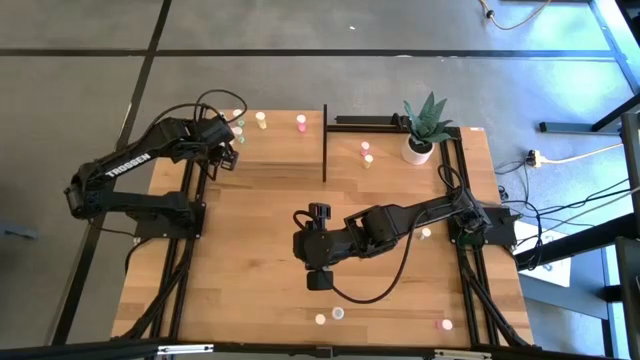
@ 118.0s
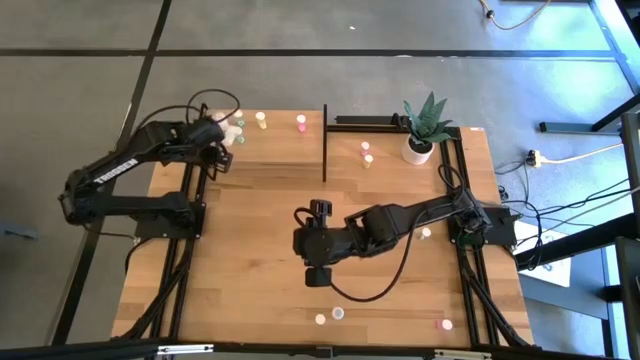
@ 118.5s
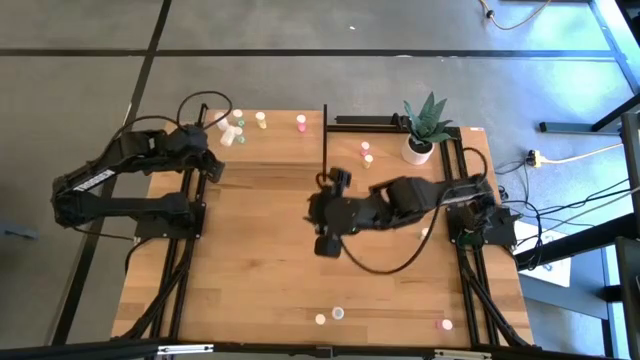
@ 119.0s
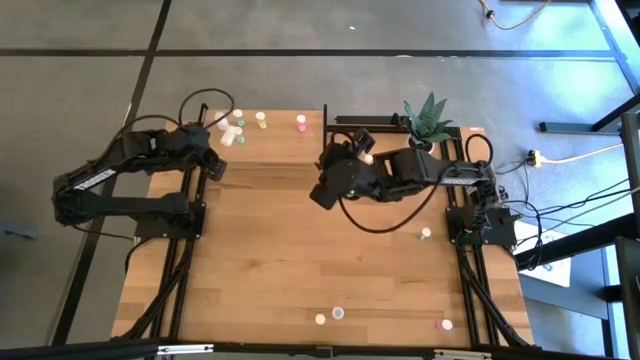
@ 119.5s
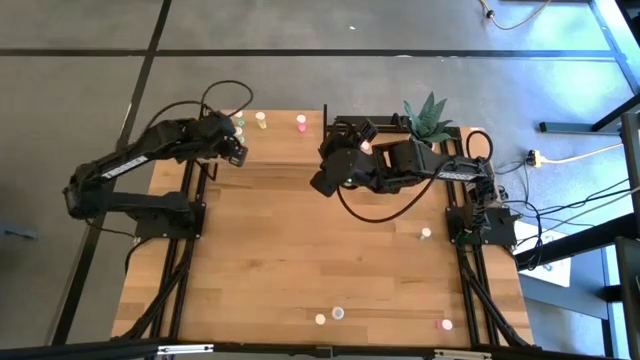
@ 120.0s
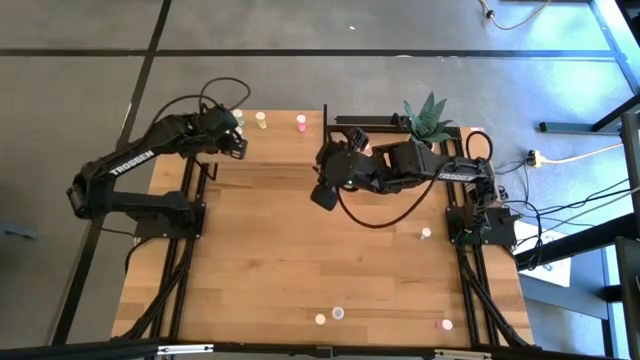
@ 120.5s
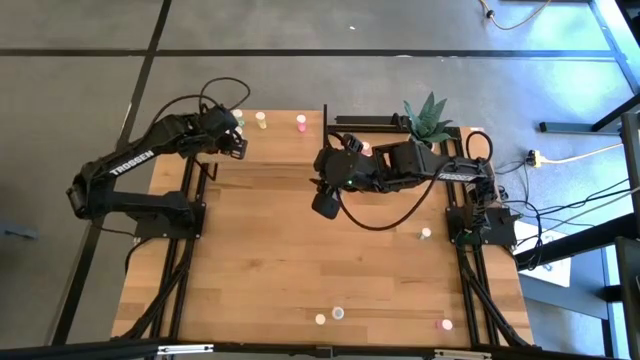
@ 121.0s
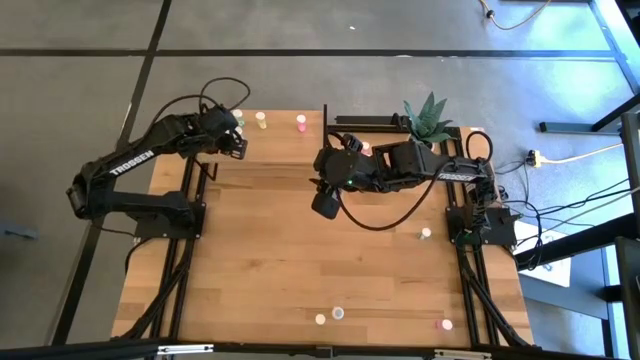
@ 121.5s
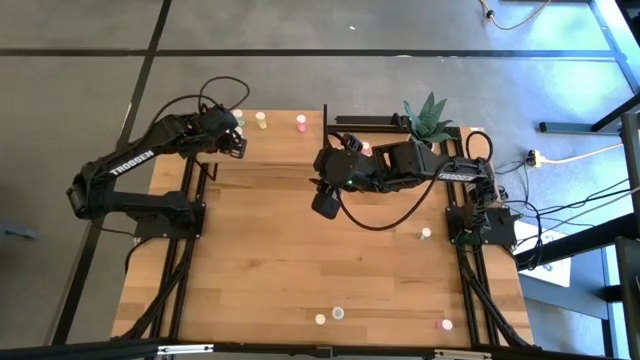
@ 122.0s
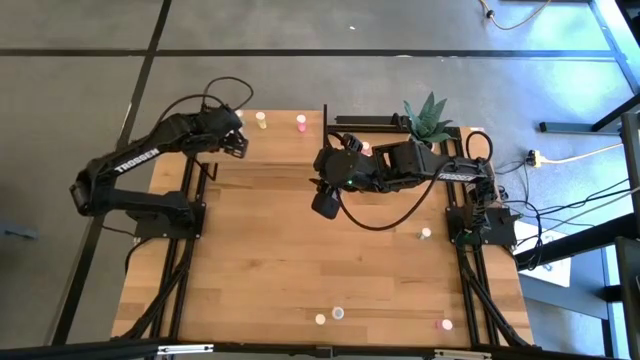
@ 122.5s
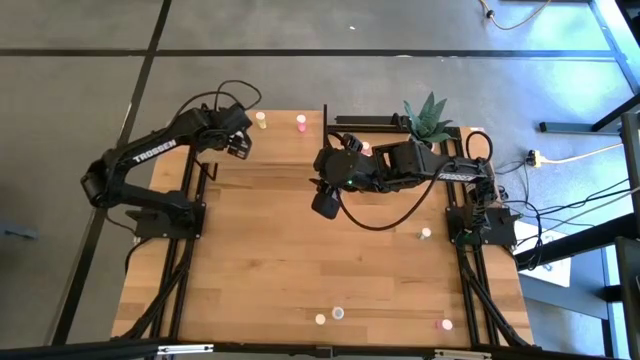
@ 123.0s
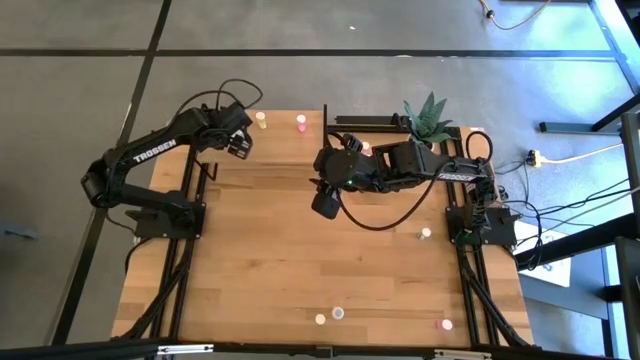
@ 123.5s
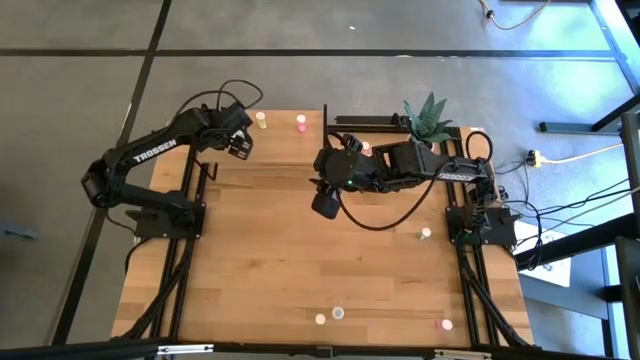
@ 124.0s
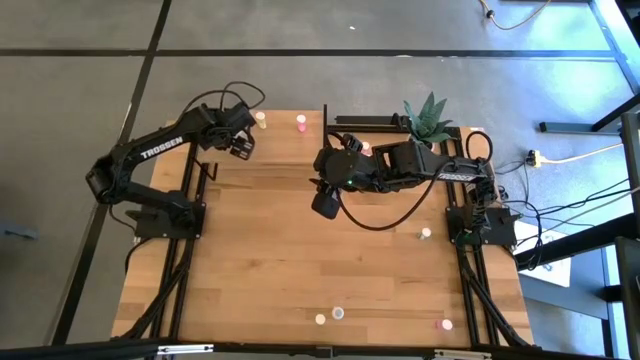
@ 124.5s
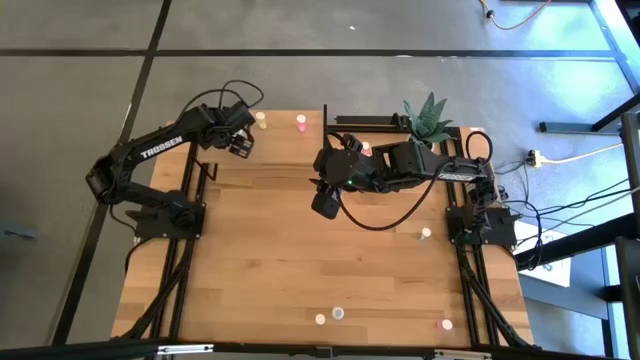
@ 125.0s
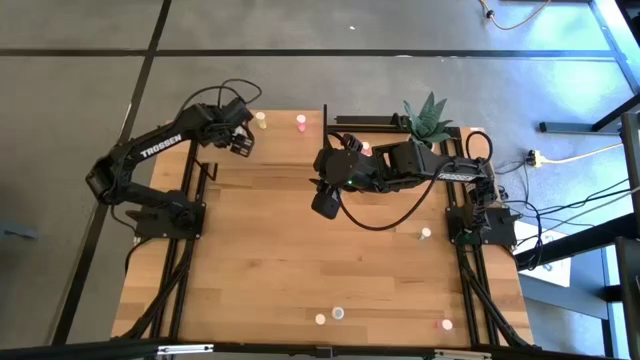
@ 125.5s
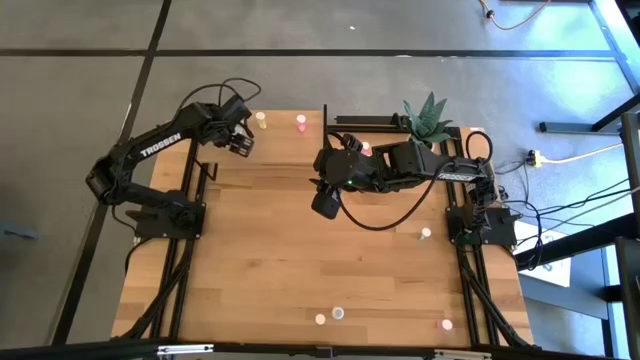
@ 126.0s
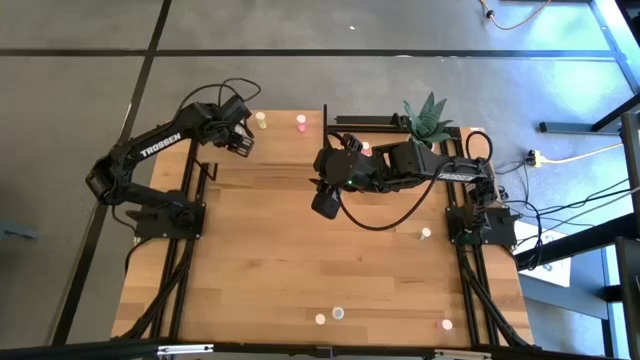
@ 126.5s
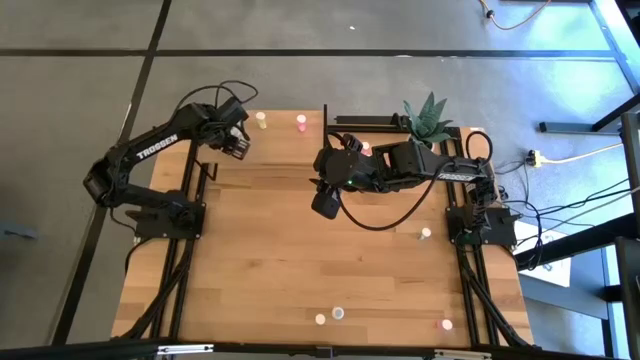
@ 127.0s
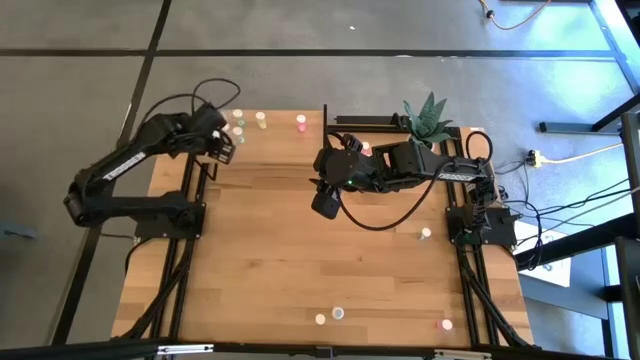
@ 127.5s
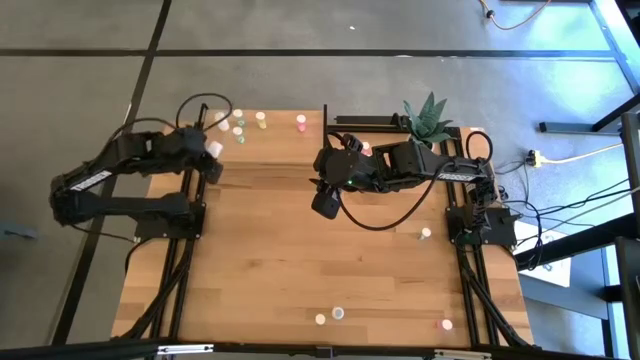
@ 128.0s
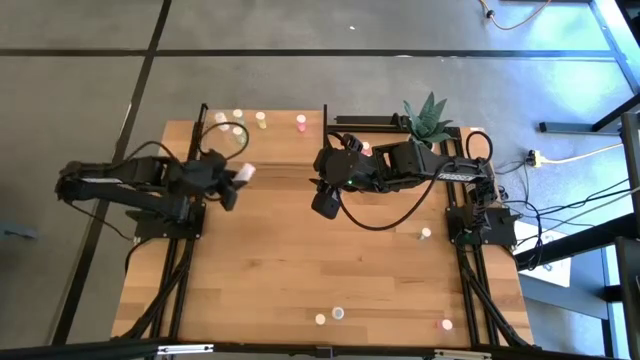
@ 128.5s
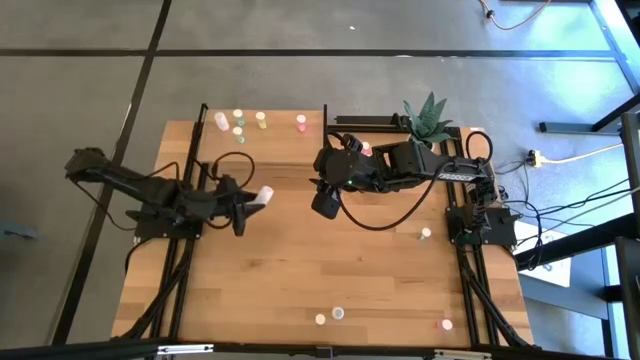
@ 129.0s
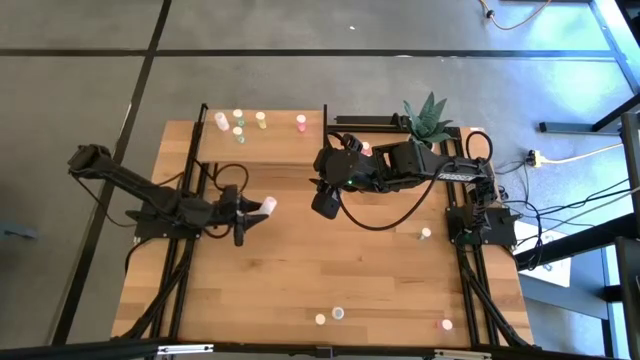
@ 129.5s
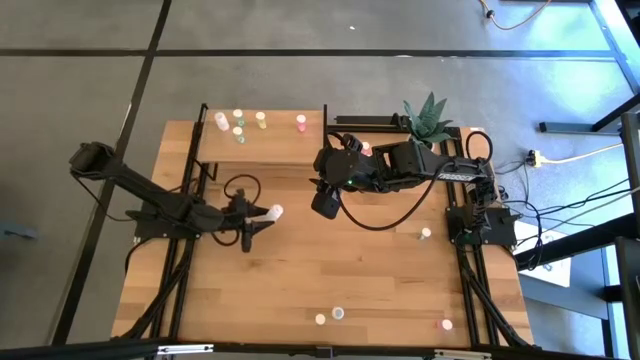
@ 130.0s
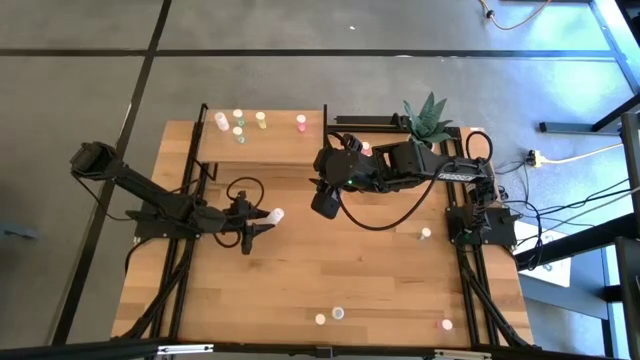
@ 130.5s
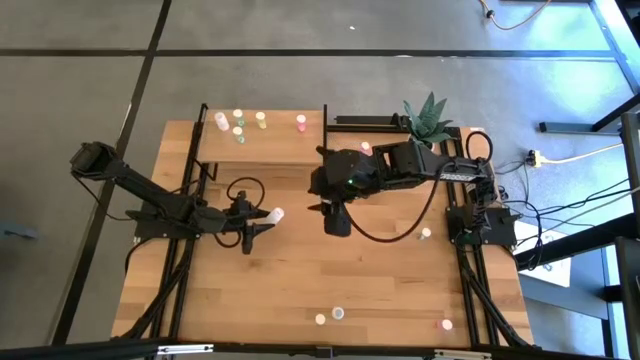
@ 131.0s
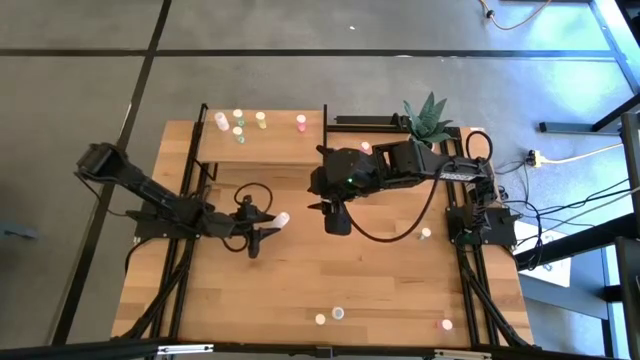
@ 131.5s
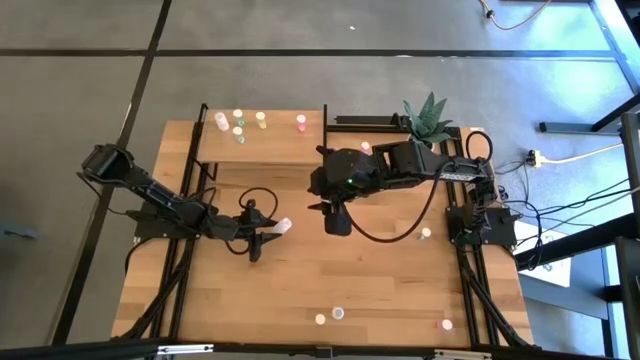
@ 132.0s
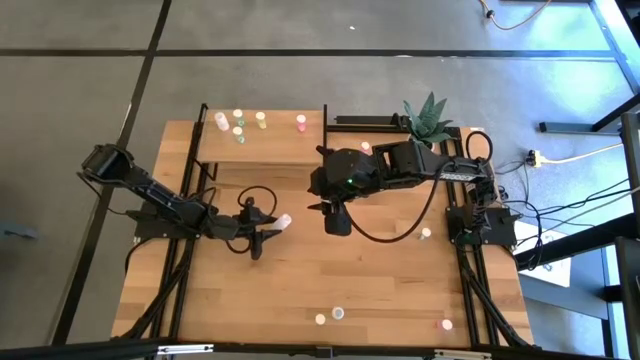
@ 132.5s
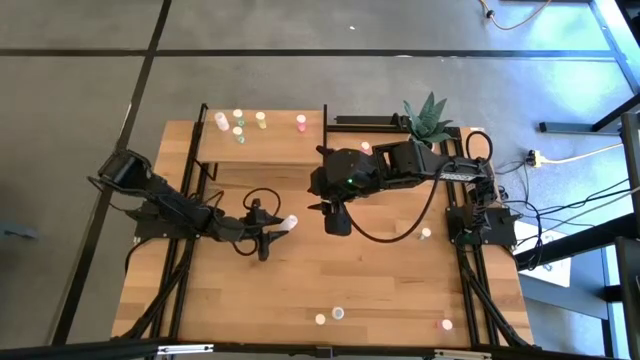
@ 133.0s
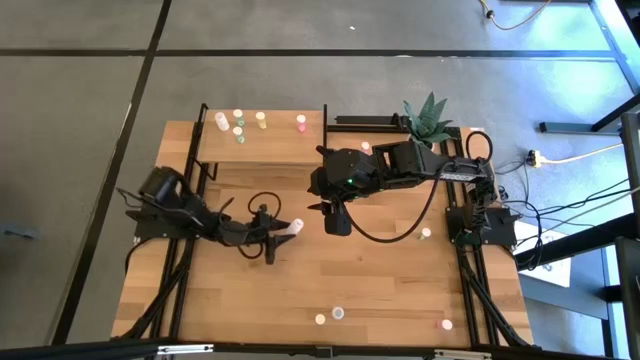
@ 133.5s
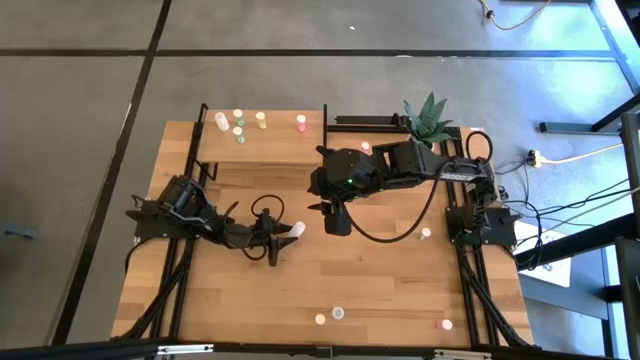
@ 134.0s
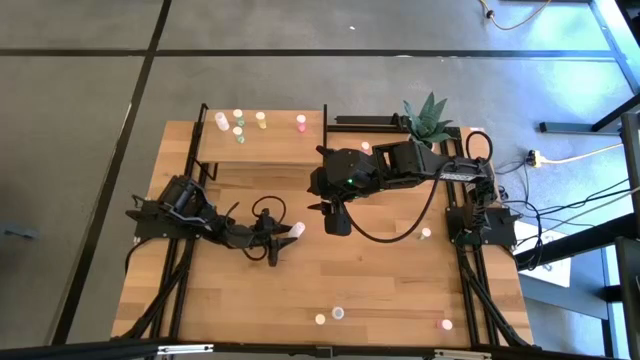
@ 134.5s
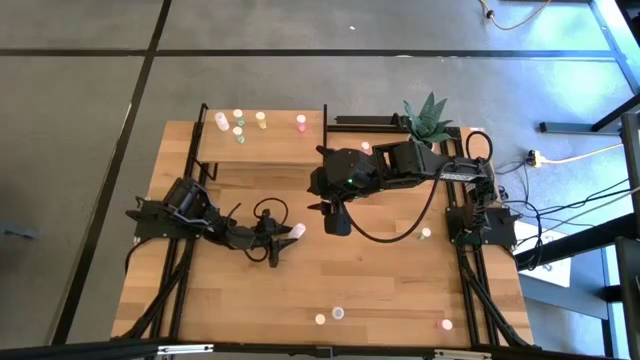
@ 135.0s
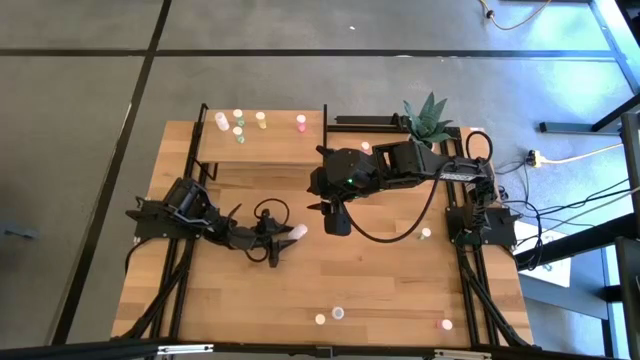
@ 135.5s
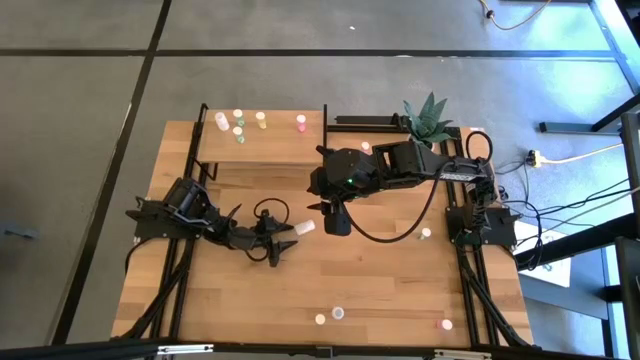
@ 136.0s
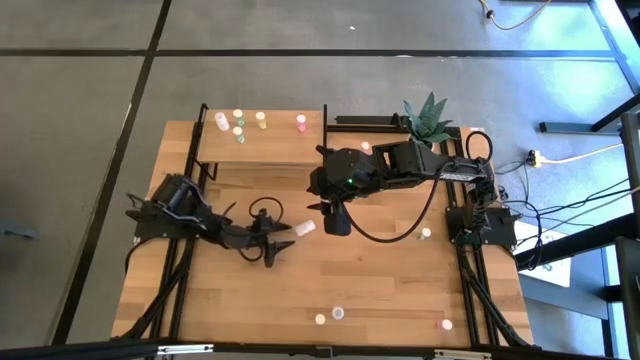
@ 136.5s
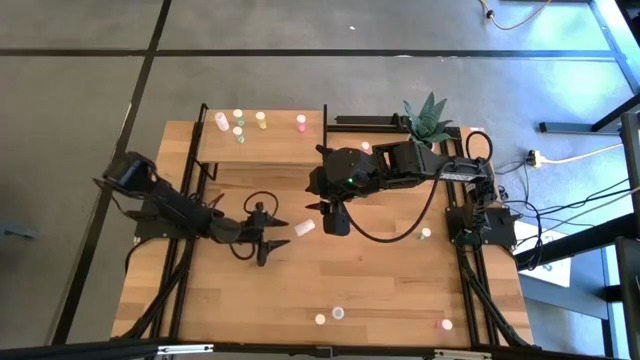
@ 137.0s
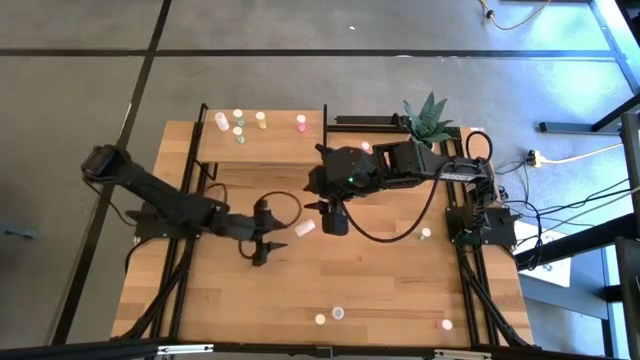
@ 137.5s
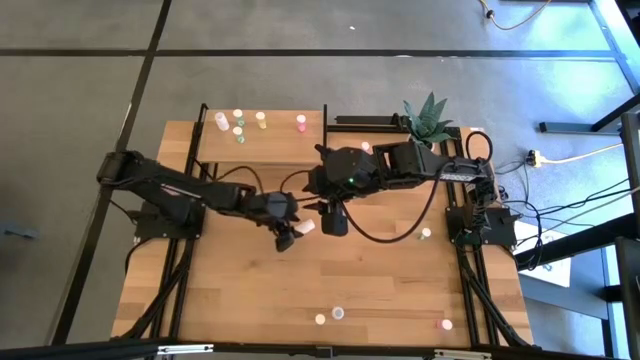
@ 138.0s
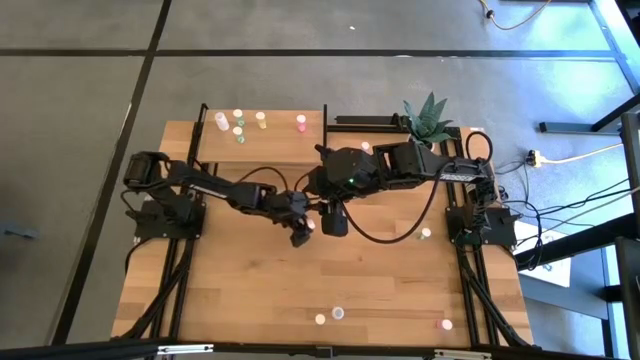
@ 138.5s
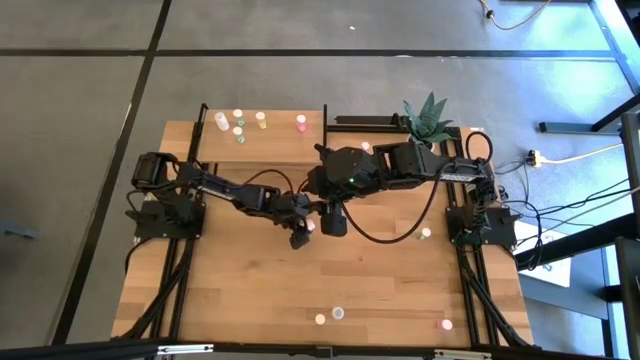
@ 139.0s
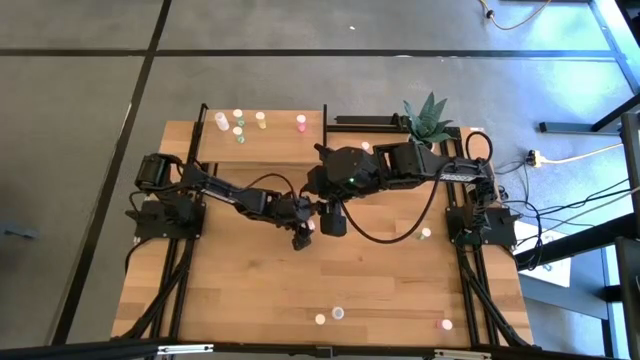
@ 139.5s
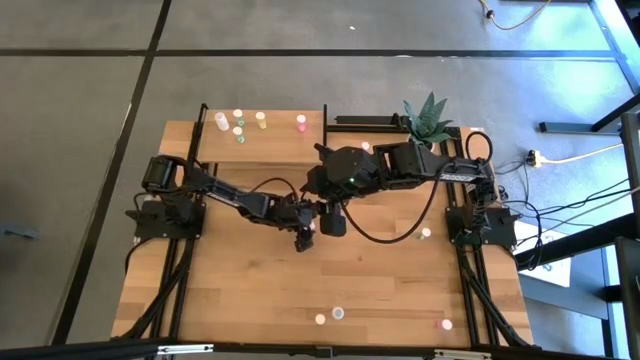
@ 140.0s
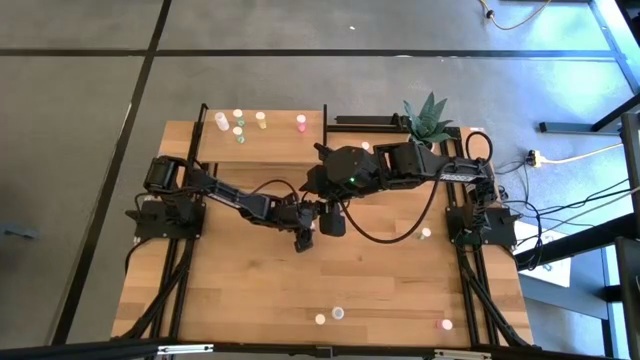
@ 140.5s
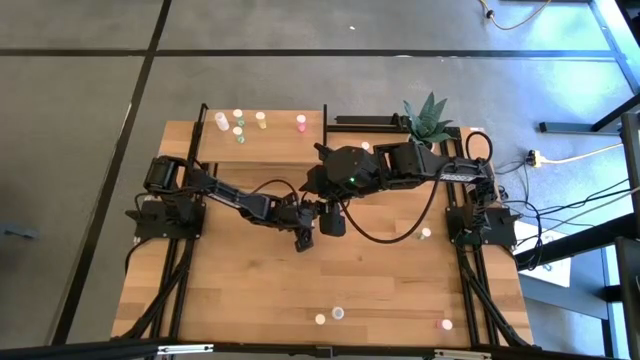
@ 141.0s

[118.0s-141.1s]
Task: Pick and place medicine bottles onto shelf by color
Put the top white pill bottle aligned with the other white pill bottle on the shelf
